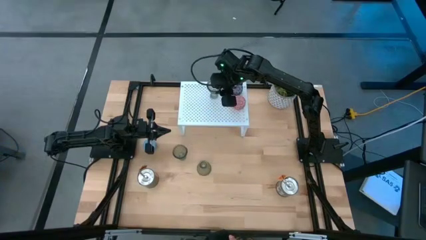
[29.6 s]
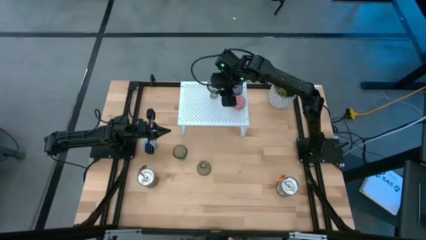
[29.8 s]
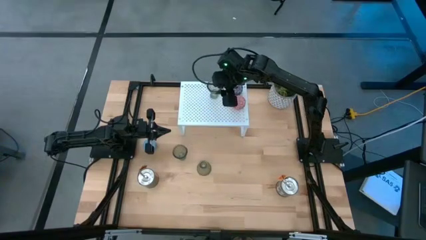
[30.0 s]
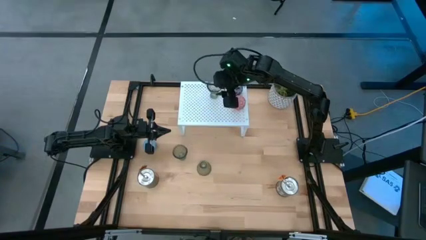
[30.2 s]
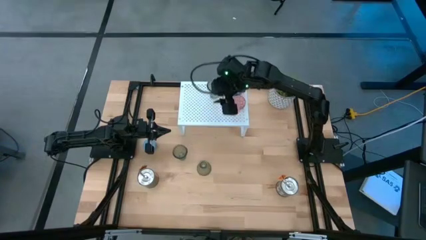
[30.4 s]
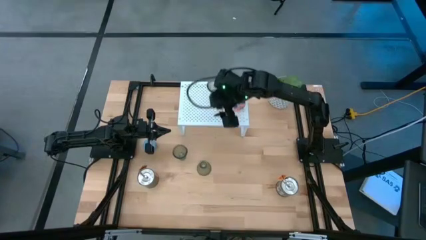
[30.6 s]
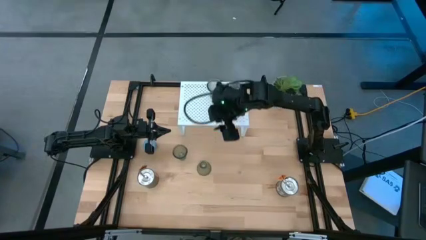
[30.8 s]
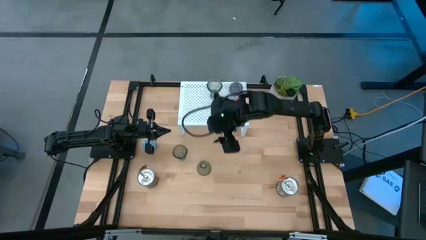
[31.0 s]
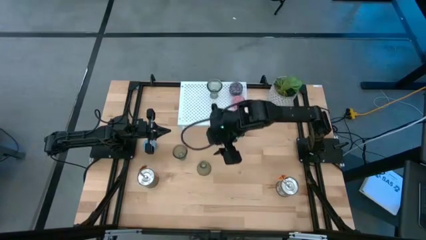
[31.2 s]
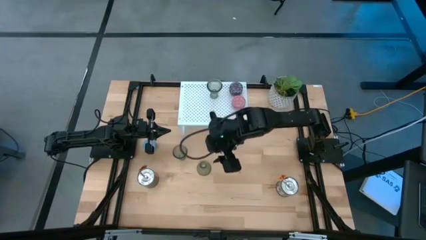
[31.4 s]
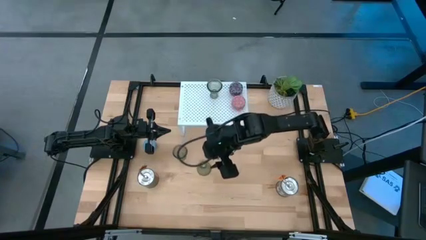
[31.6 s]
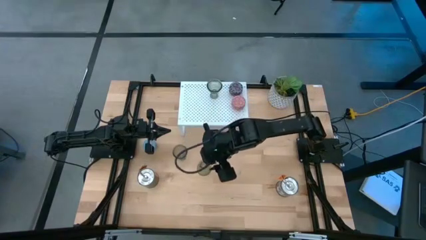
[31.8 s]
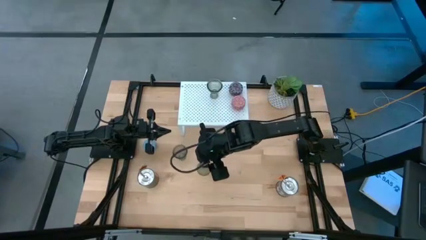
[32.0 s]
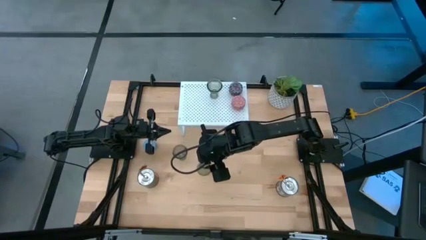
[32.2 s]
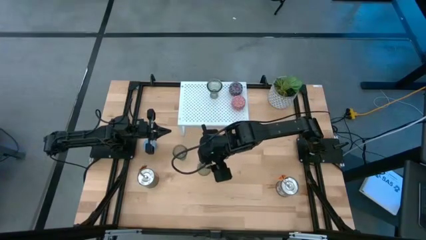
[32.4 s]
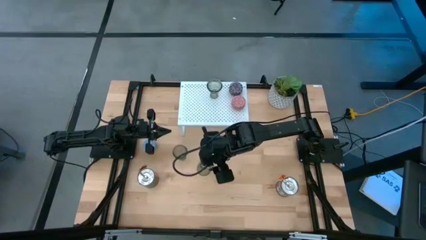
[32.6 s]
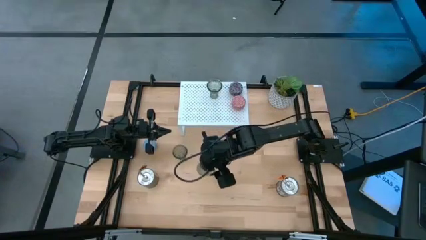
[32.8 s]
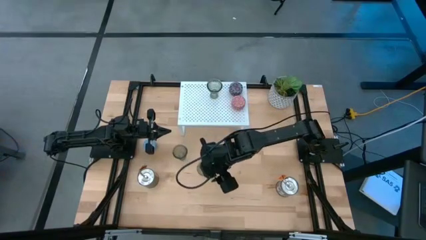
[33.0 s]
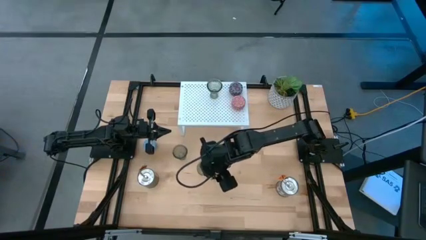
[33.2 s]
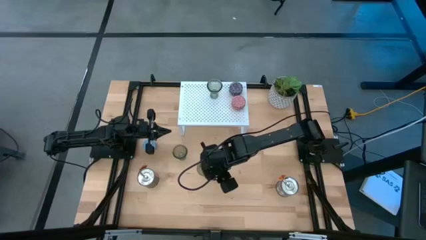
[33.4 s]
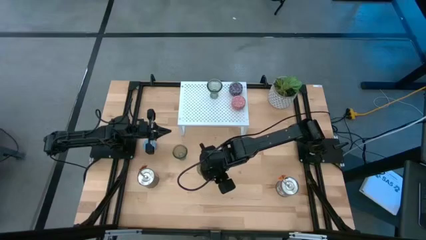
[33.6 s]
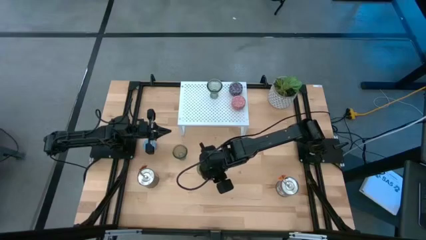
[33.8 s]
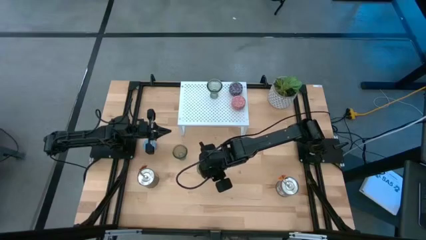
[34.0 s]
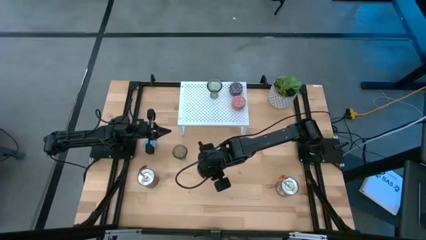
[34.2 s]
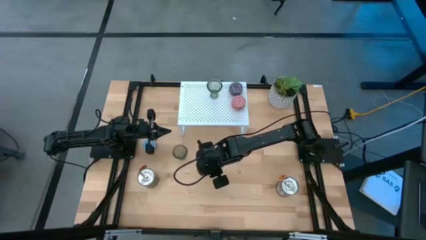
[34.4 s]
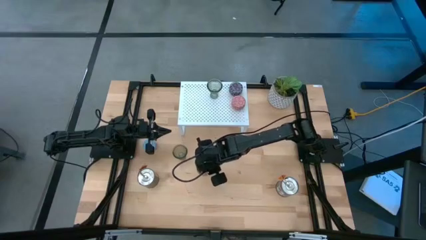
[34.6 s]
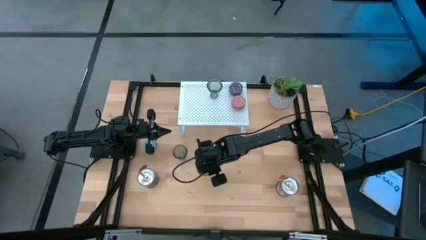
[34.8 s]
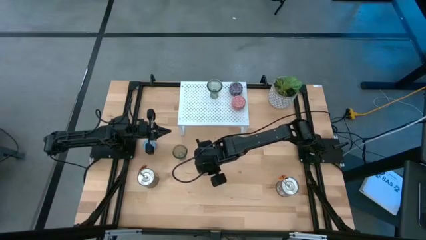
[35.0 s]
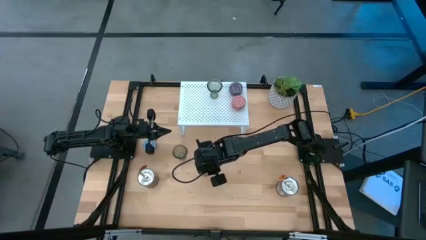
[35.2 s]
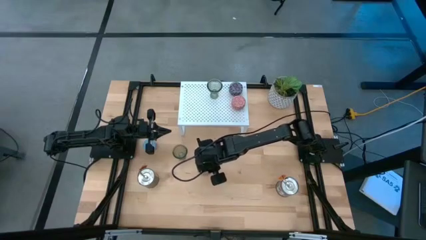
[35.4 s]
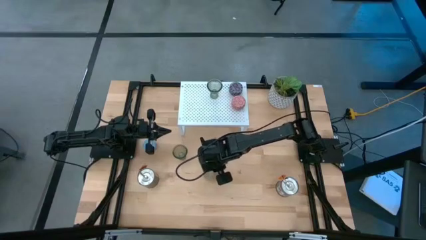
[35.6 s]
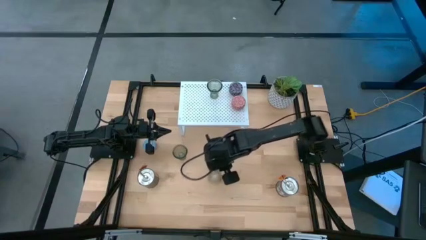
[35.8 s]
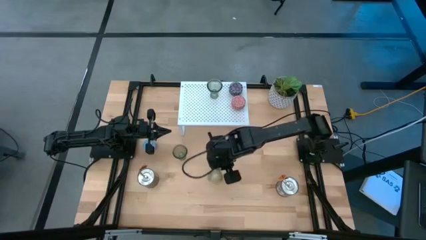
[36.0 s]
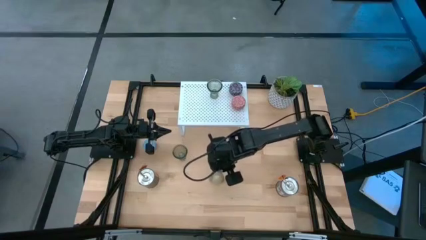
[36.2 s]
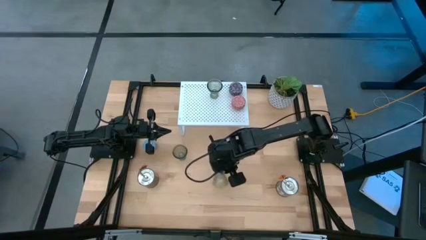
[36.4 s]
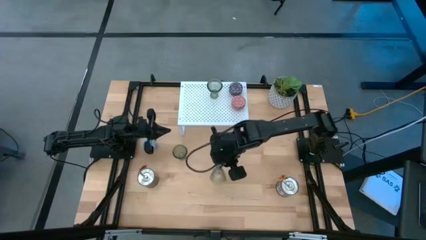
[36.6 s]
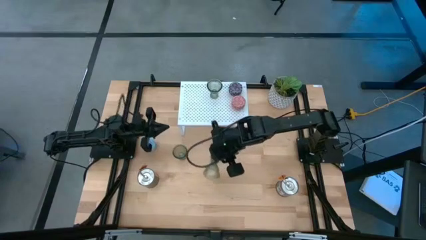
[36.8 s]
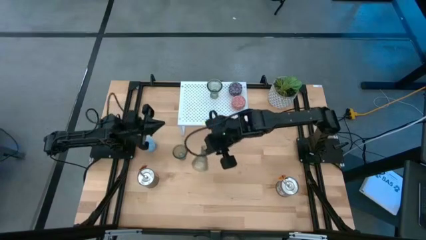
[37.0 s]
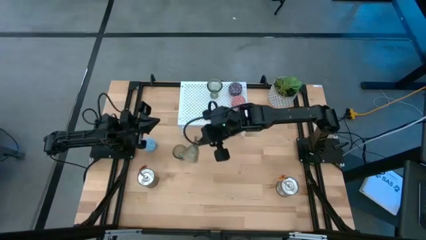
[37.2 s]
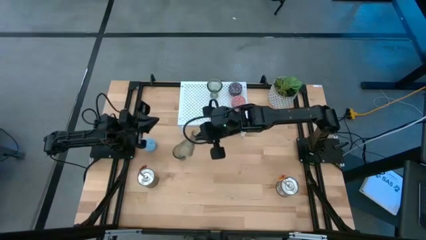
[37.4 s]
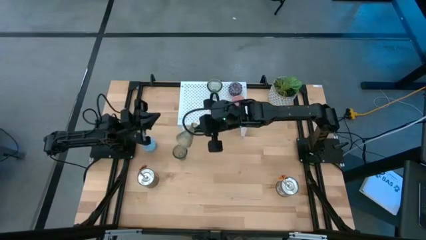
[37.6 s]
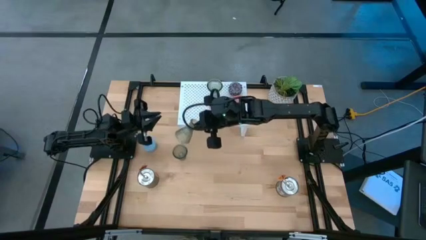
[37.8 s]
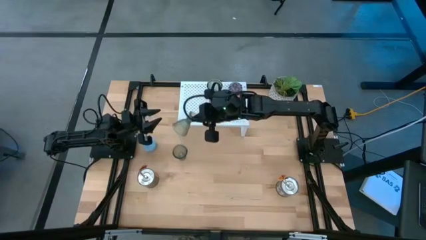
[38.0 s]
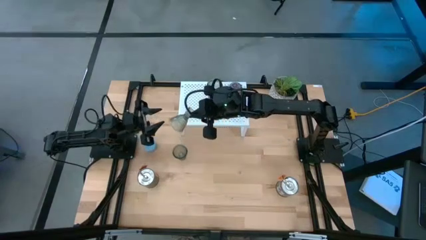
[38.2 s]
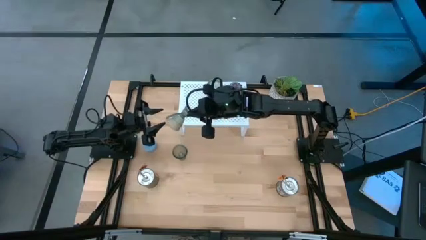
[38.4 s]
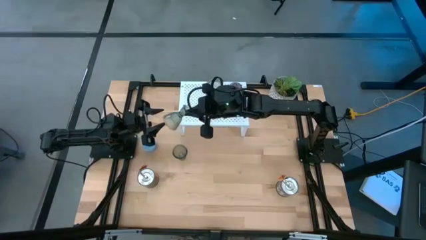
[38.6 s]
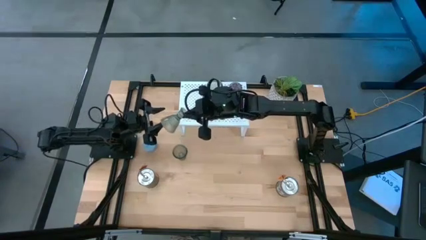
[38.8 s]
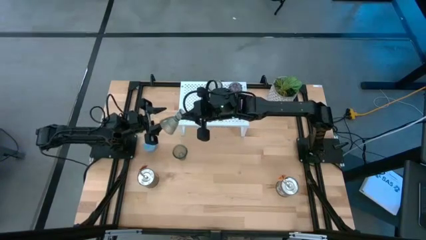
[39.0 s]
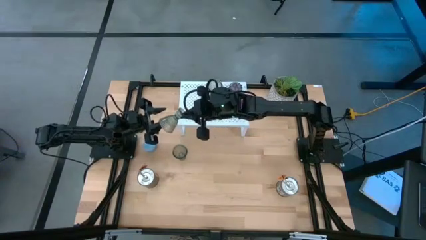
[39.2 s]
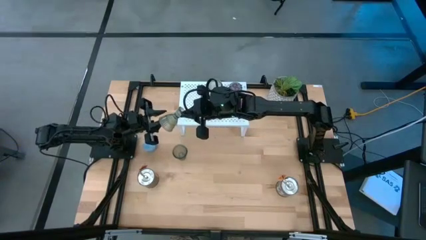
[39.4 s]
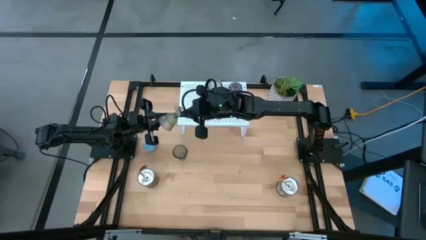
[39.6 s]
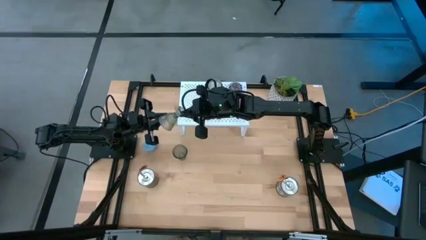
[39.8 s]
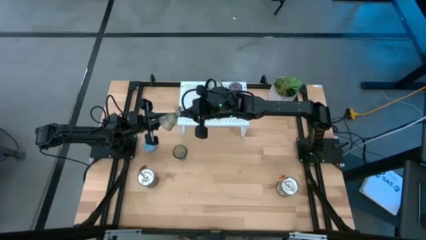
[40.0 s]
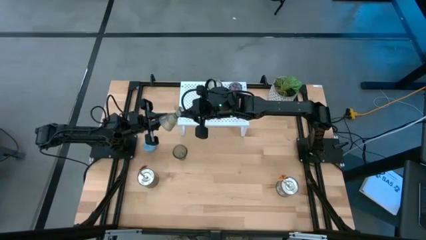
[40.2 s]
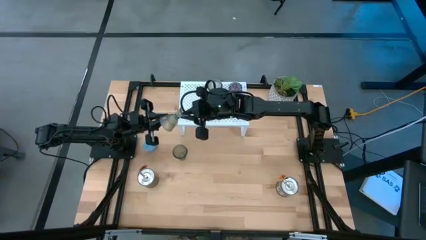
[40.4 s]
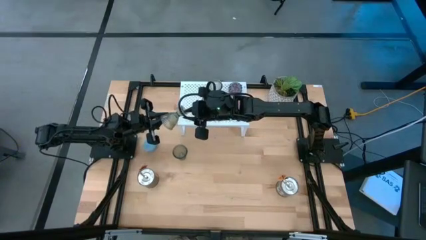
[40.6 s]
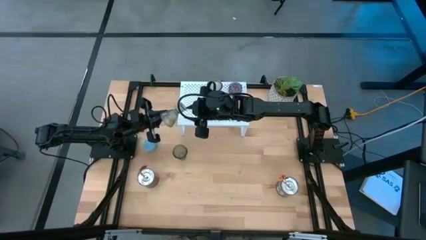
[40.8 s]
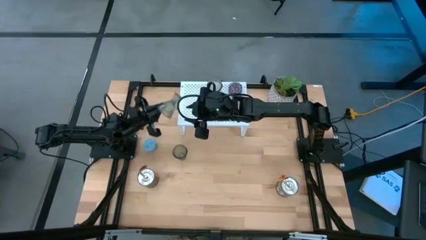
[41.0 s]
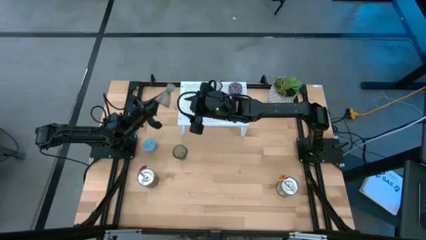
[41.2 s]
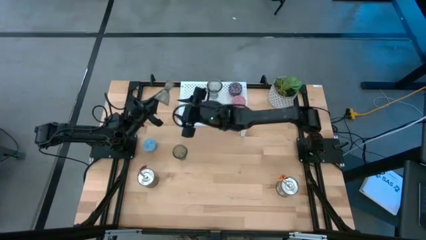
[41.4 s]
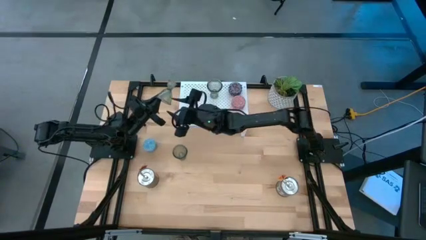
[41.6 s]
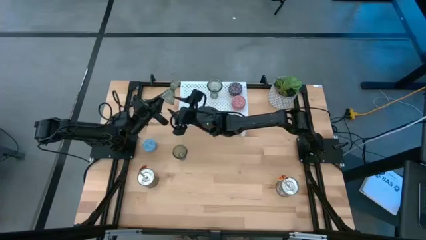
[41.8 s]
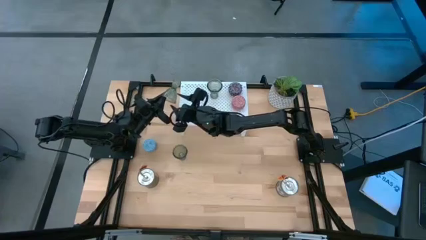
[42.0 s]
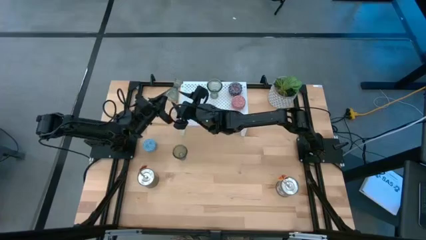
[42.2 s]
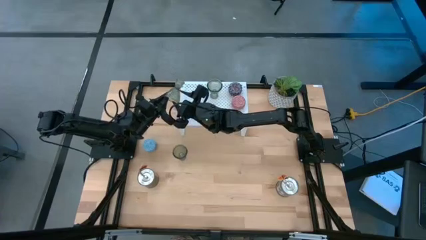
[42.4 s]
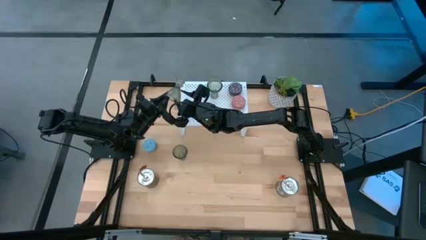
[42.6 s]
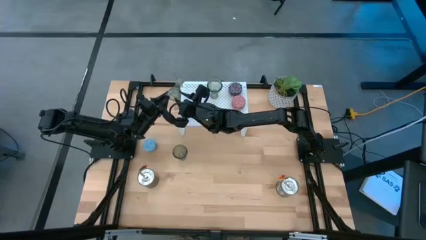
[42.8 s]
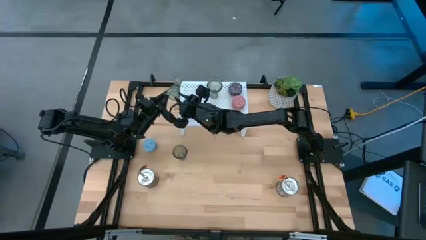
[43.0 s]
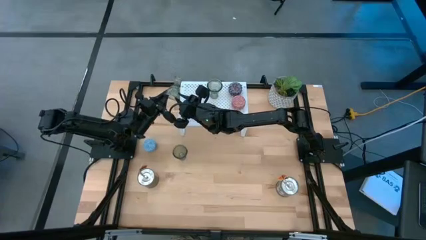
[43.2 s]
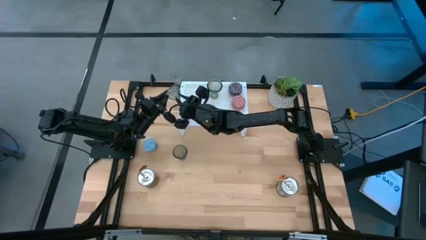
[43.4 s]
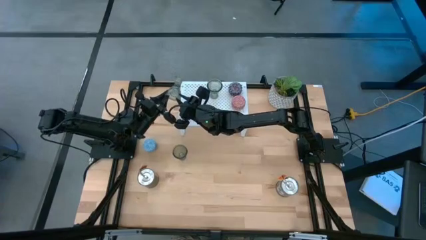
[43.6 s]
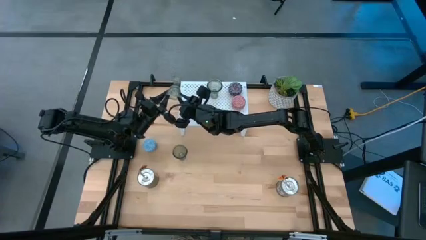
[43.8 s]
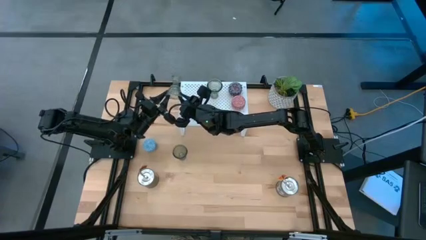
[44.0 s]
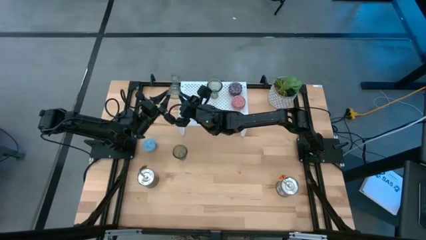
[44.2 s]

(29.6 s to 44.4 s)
Task: Pick & Place candle stick holders
Put the right green glass candle holder on the shelf aligned with the other glass candle holder
